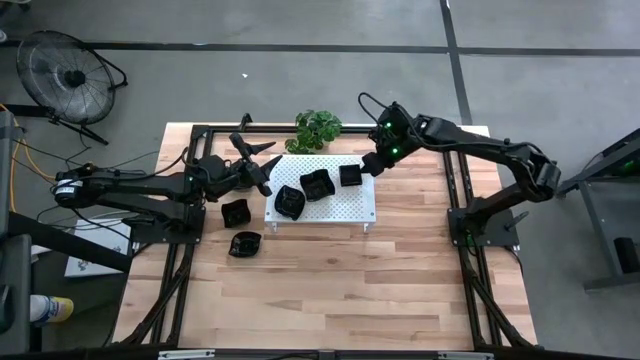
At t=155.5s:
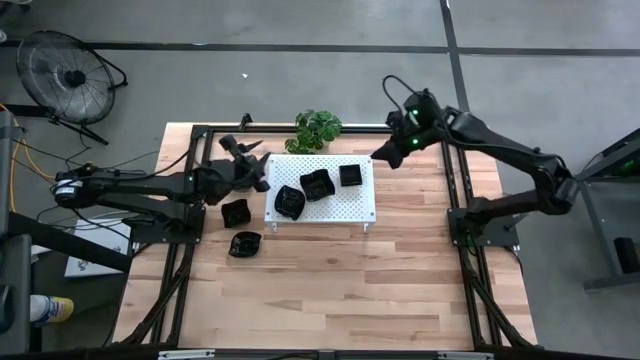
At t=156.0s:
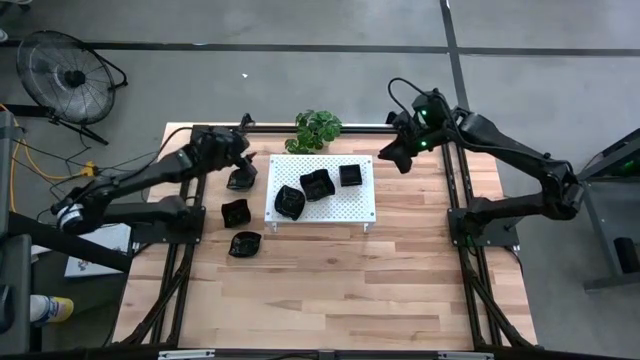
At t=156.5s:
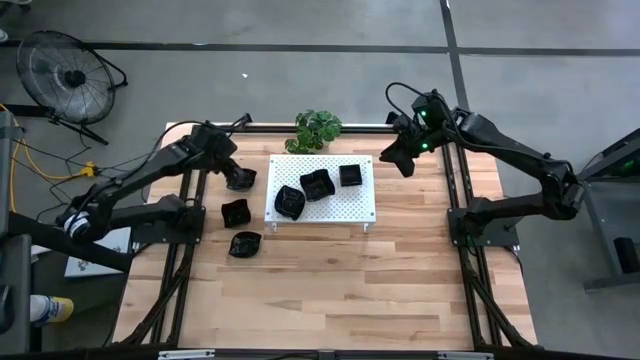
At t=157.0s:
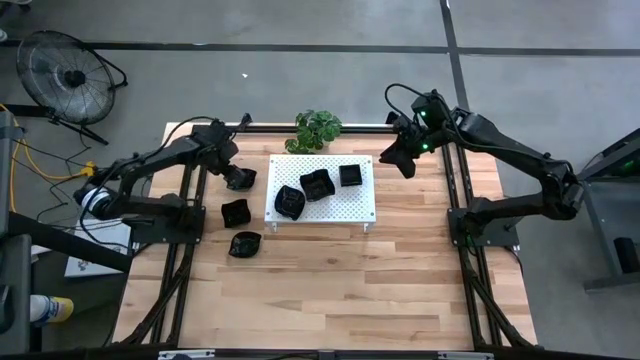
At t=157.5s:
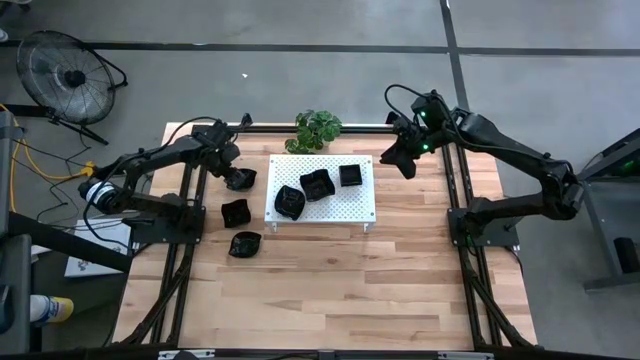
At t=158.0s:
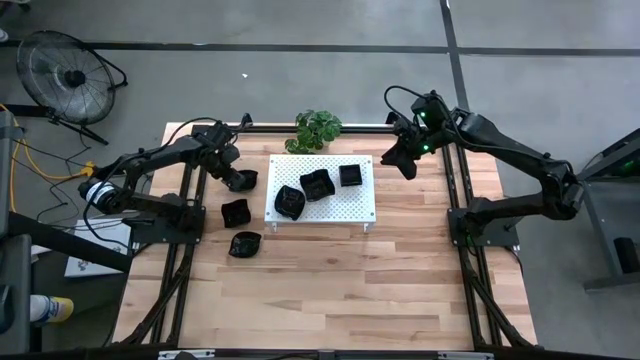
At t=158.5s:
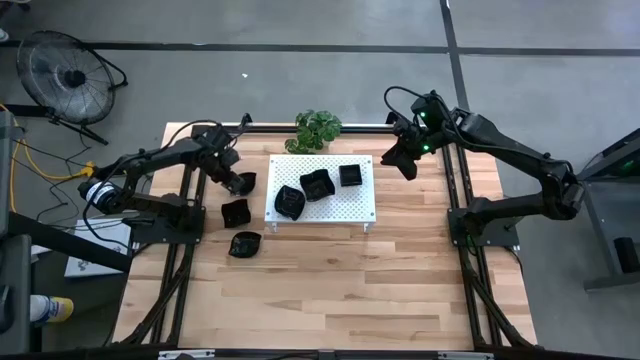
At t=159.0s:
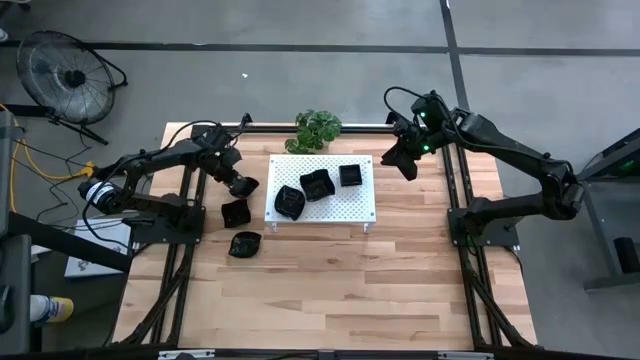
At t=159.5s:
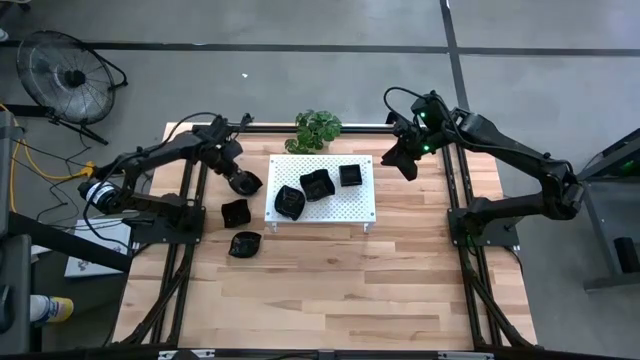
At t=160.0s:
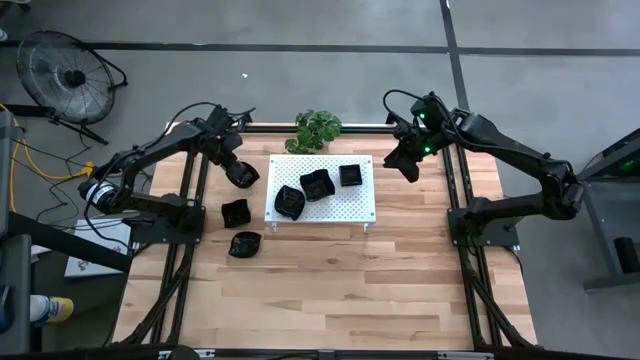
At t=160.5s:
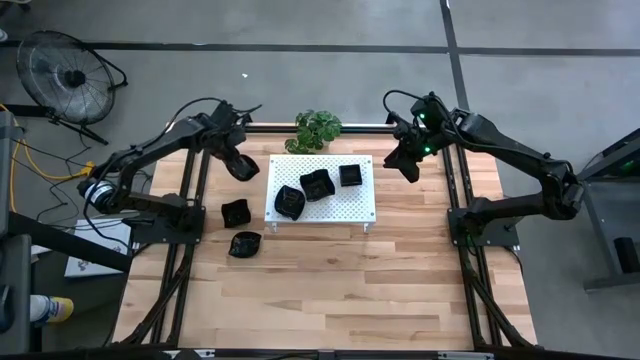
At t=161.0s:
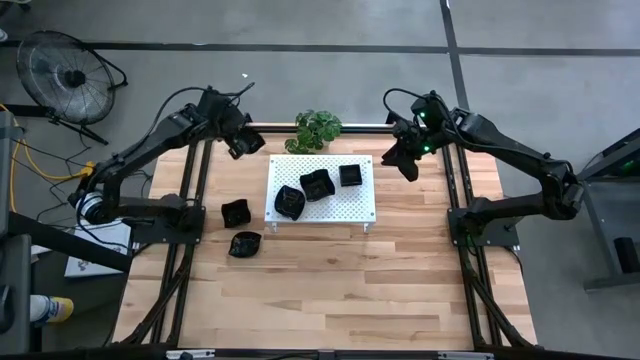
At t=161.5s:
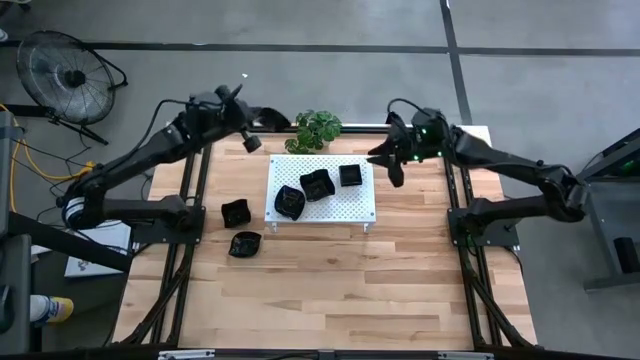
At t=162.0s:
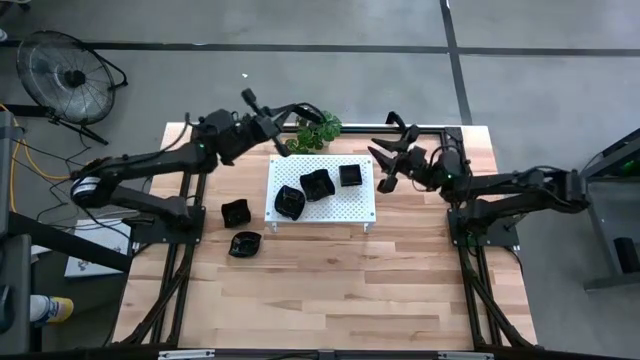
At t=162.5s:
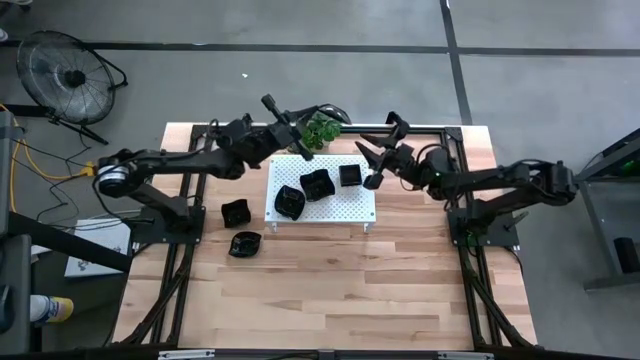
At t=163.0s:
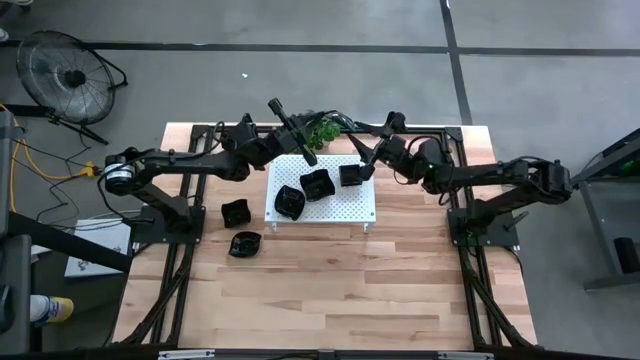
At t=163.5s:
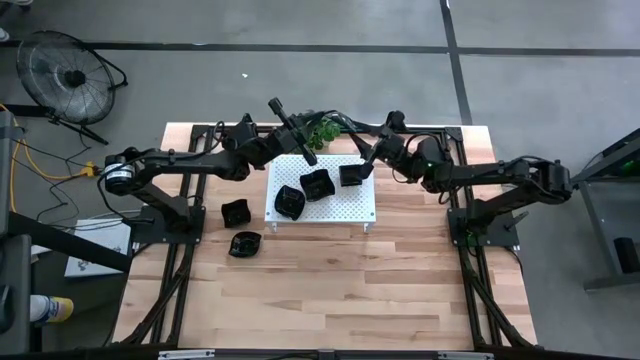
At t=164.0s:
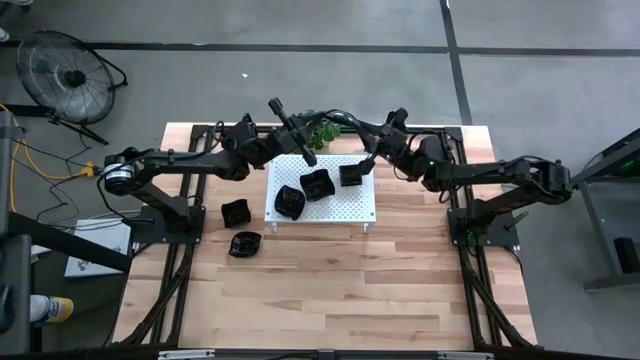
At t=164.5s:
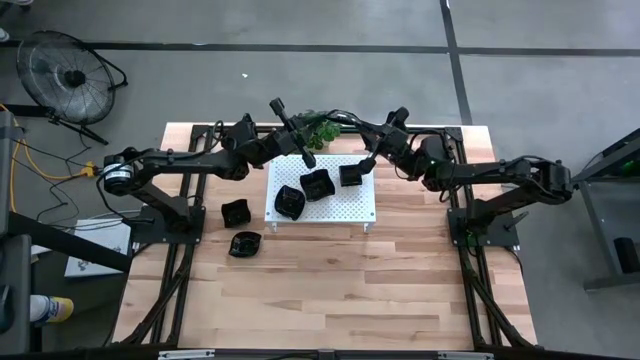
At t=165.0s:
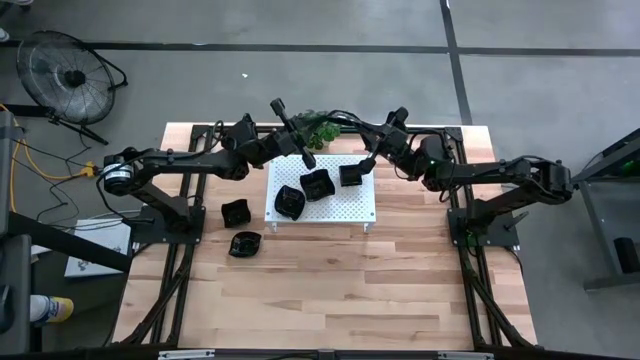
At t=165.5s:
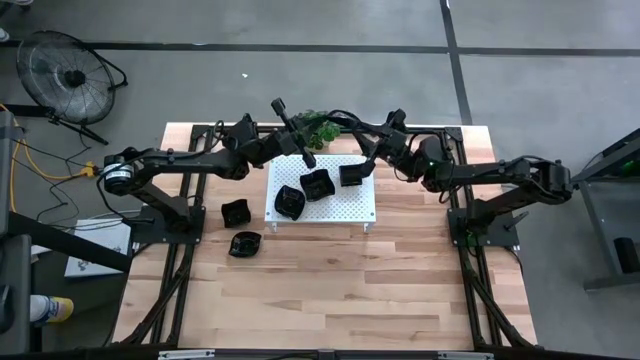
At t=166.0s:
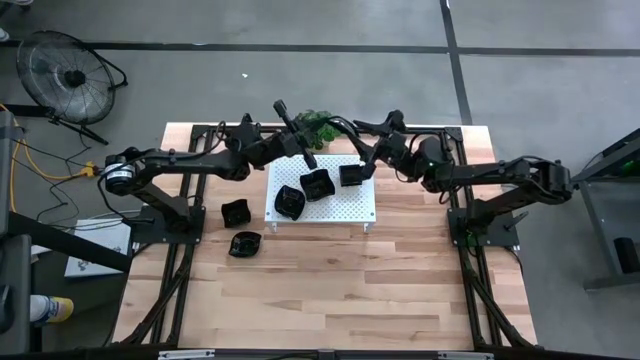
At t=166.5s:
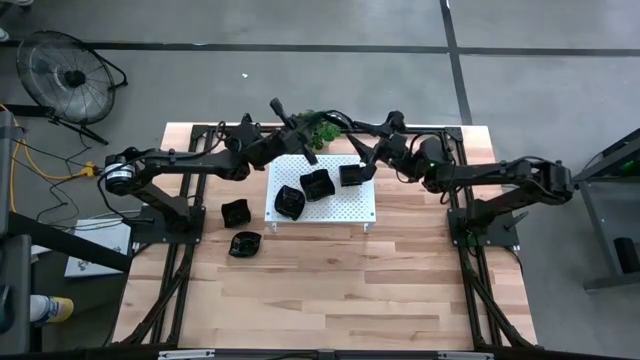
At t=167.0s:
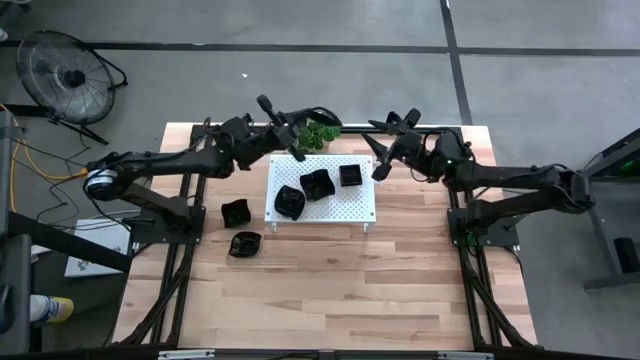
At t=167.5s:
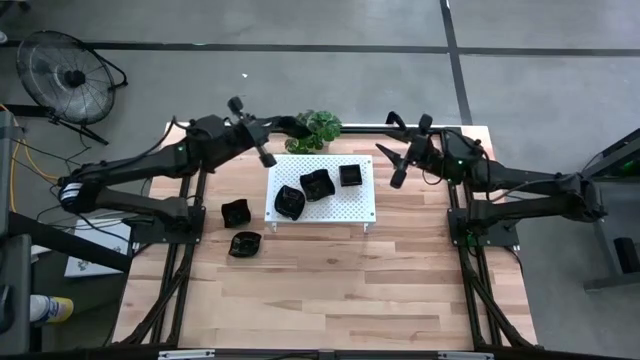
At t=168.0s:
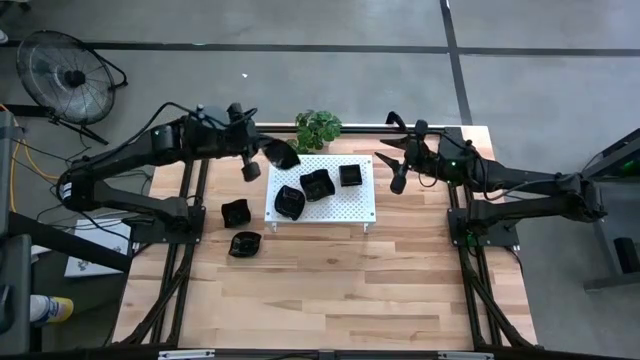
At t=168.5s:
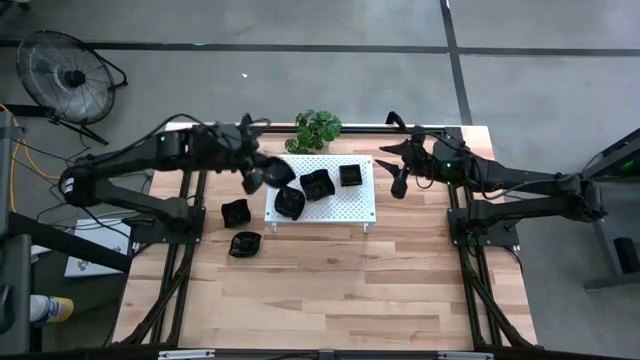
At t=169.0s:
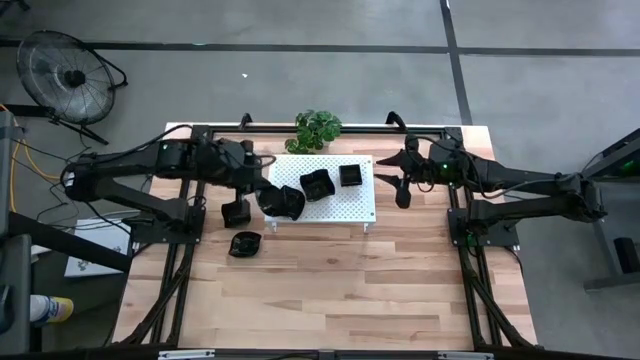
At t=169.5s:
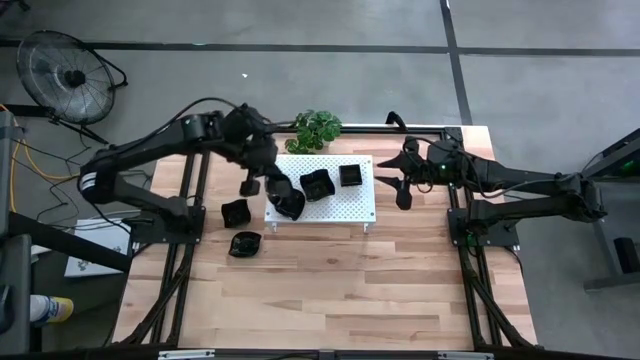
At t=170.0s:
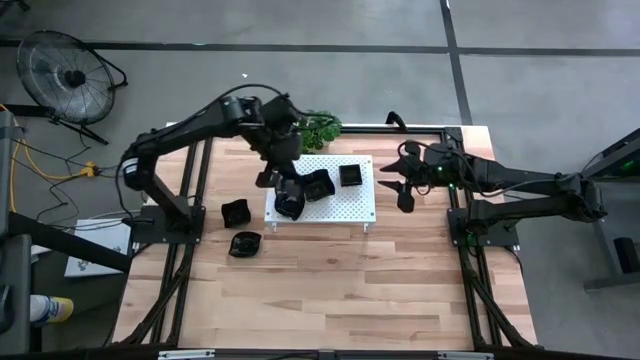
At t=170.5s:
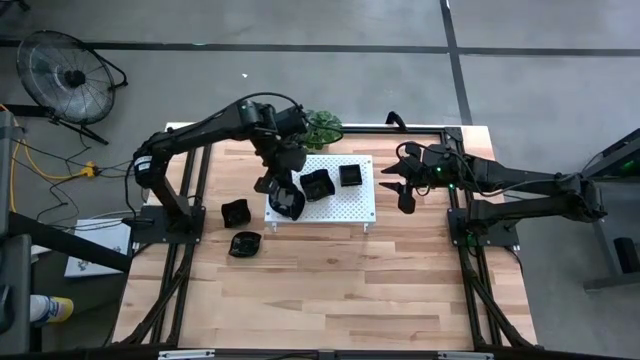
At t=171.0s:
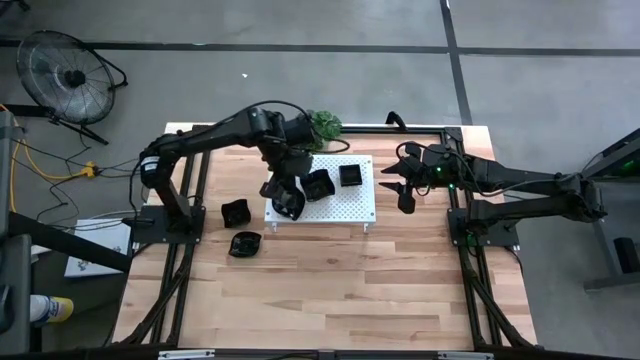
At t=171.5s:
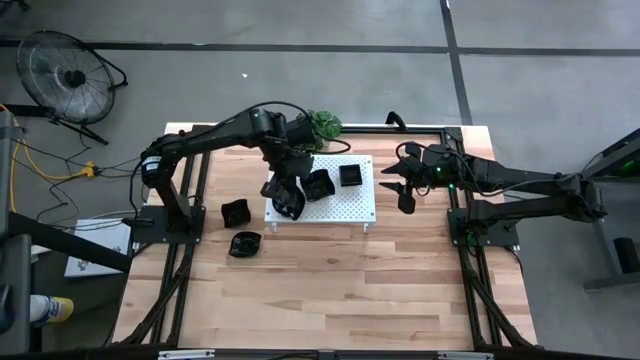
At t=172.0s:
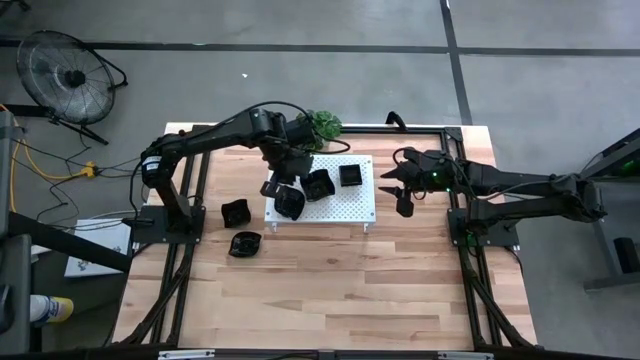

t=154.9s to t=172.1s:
Task: Pick & Place Mini shaped plates
Stack the leaf shaped plate on top of the leaf shaped plates on the shelf

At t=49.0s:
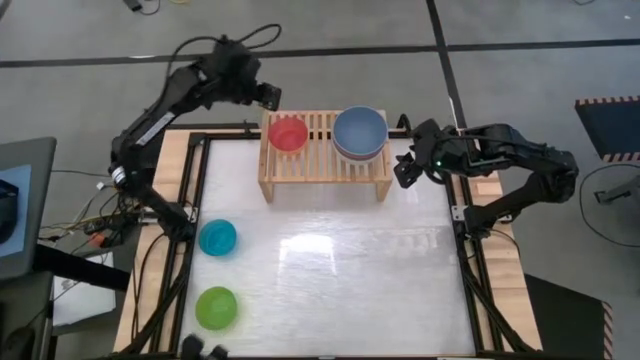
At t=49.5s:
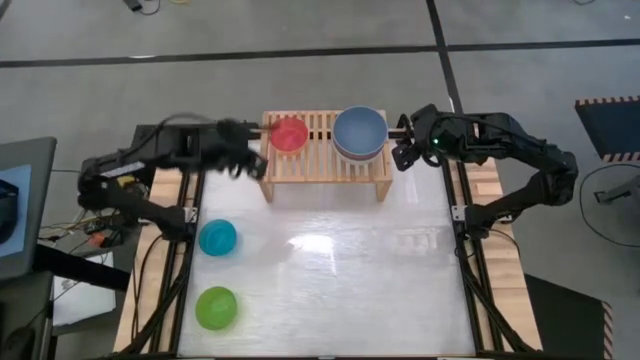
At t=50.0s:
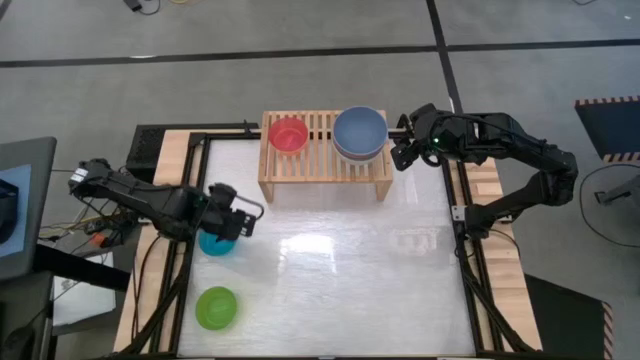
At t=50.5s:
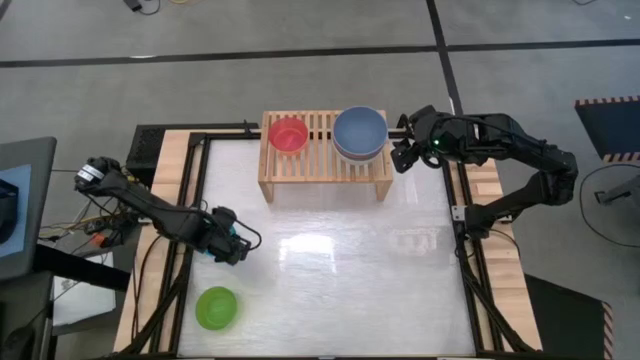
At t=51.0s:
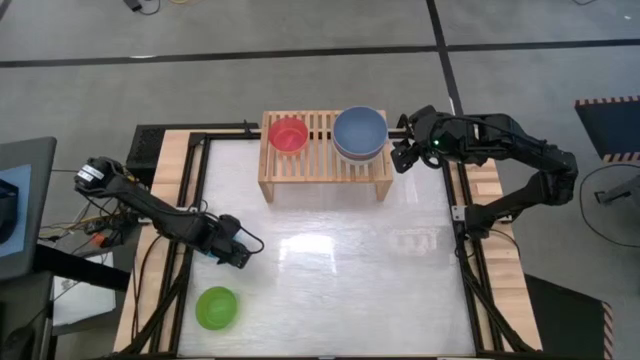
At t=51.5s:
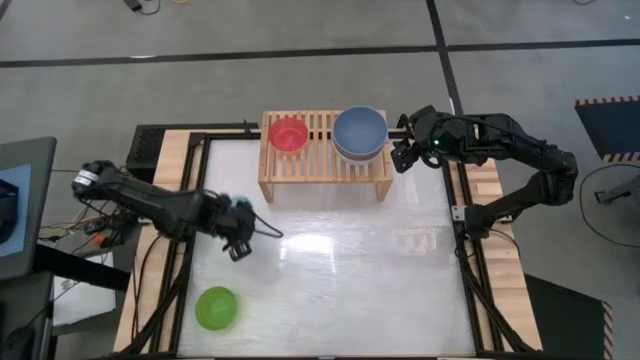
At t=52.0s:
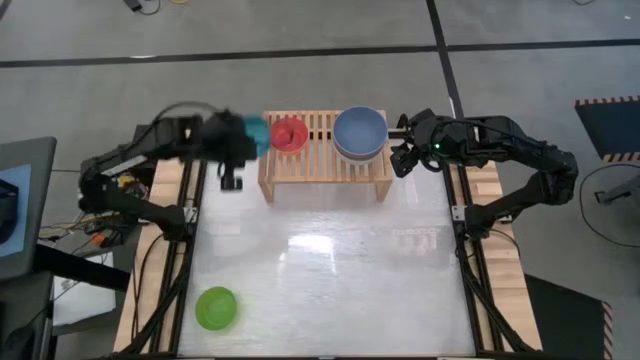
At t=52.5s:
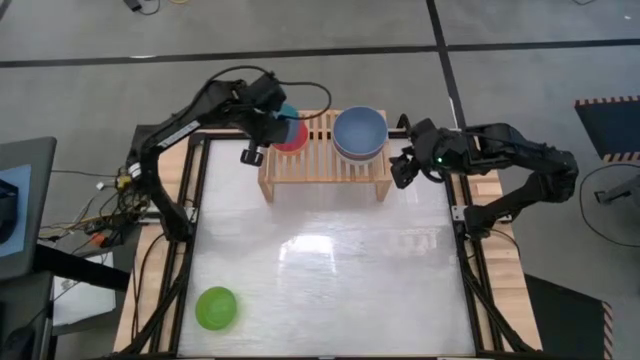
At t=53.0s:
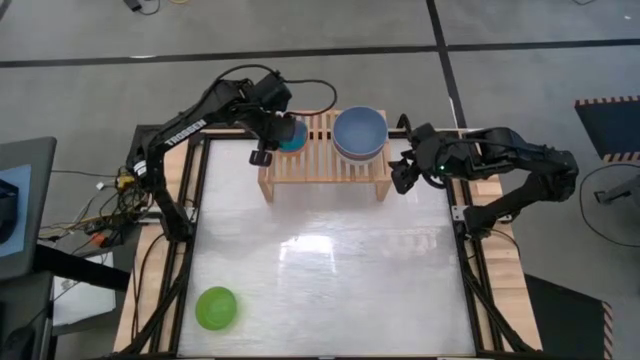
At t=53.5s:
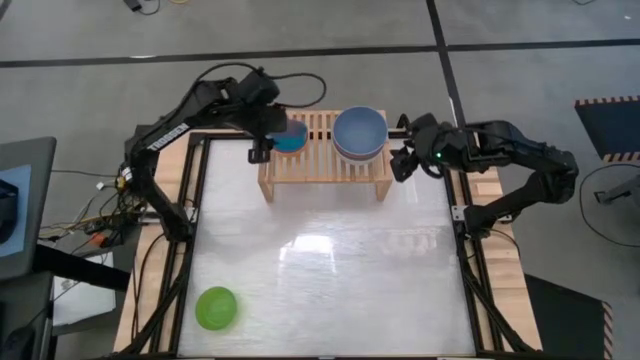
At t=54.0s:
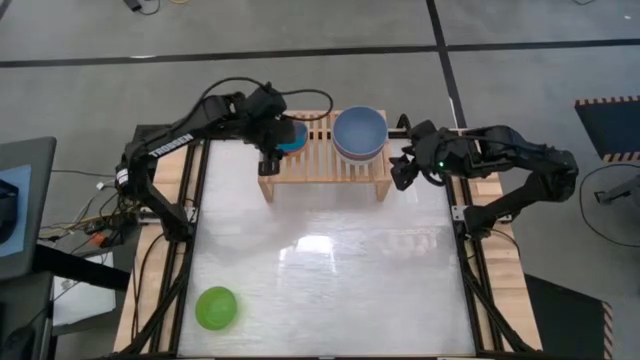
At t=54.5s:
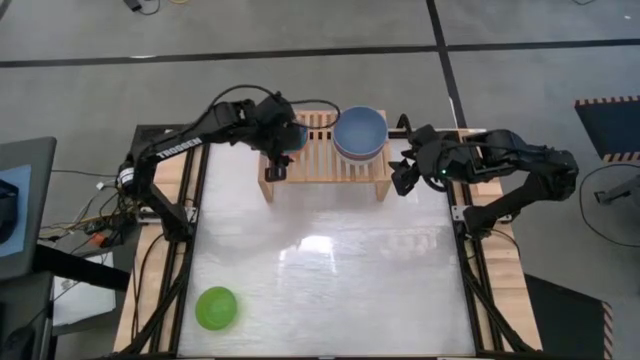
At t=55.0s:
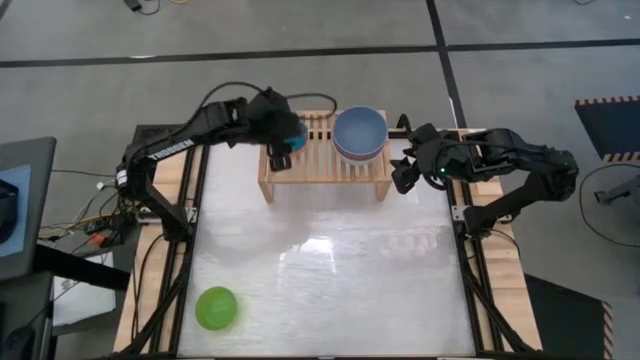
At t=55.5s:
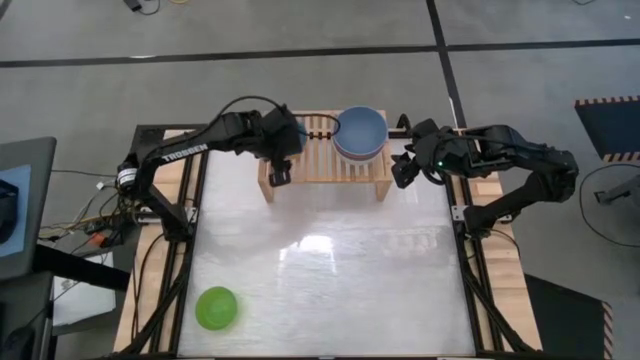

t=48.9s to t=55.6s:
Task: Place and stack bowls onto a shelf
Stack the light blue bowl on top of the pink bowl on the shelf
